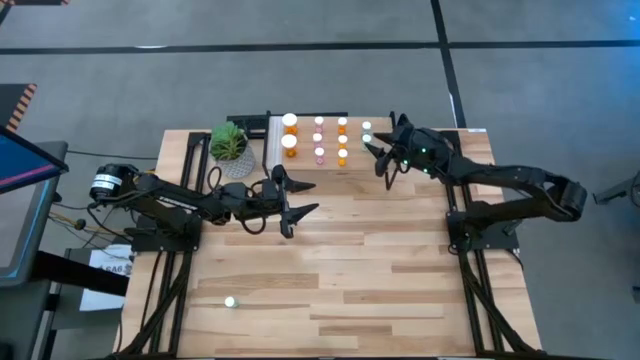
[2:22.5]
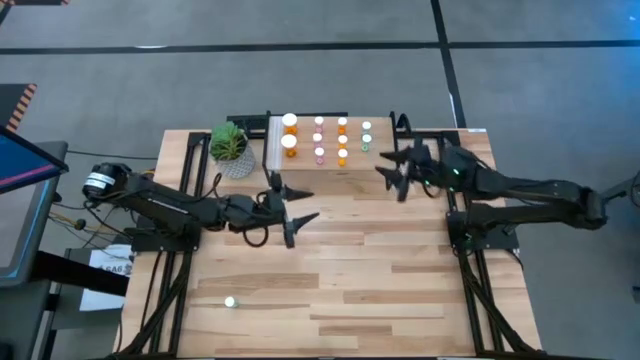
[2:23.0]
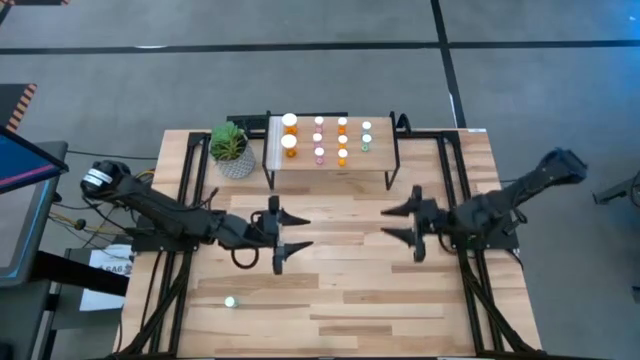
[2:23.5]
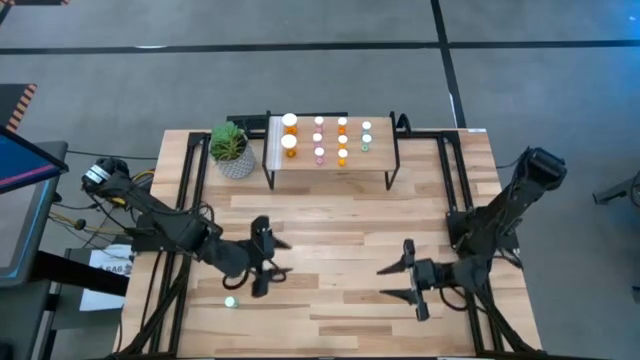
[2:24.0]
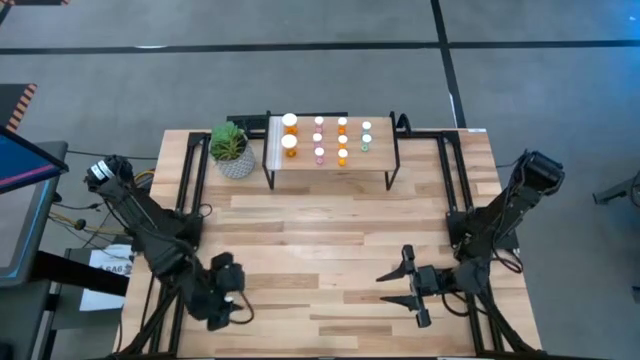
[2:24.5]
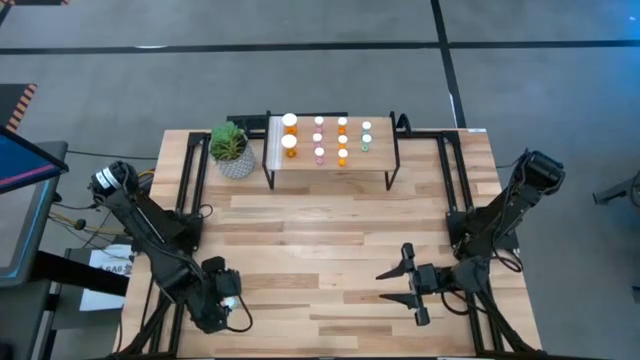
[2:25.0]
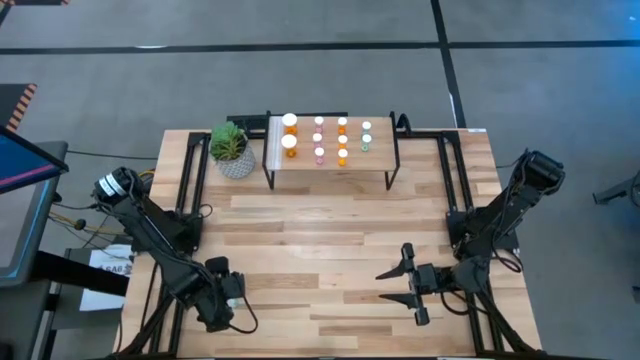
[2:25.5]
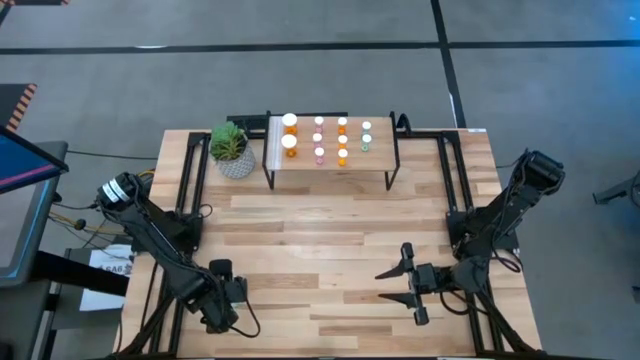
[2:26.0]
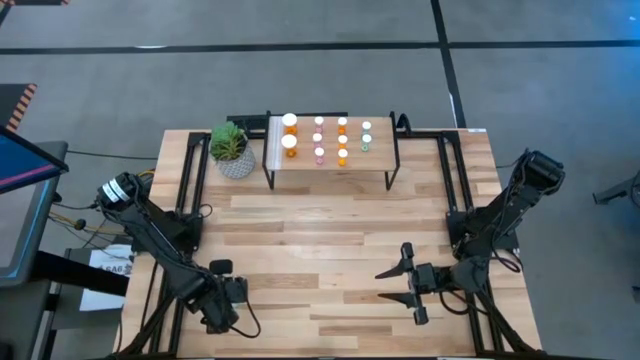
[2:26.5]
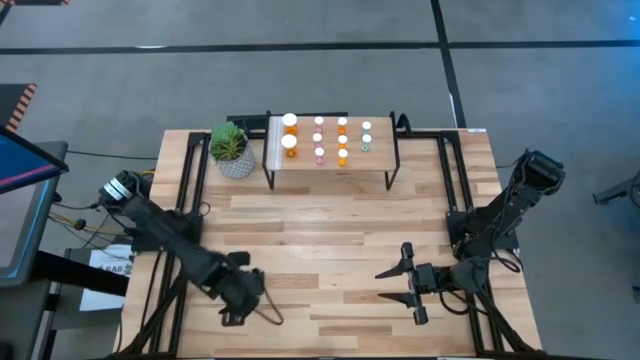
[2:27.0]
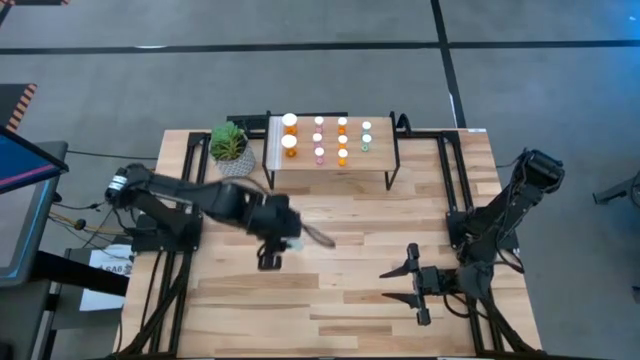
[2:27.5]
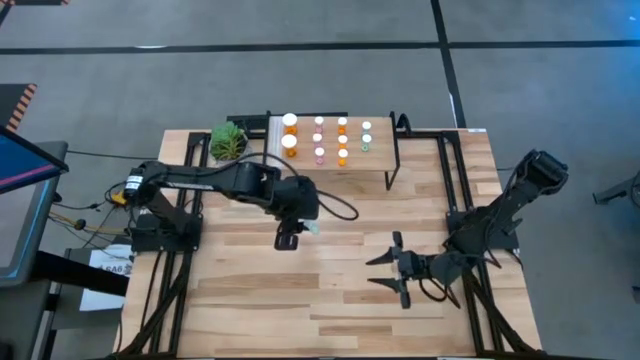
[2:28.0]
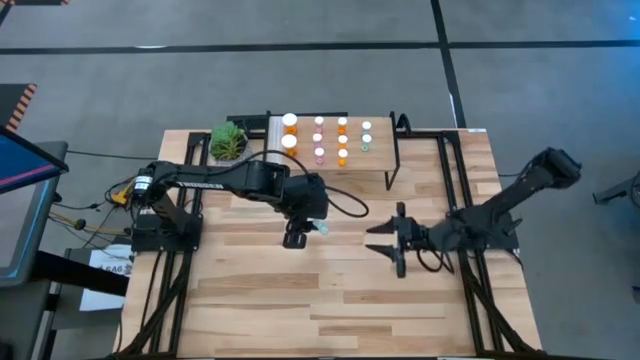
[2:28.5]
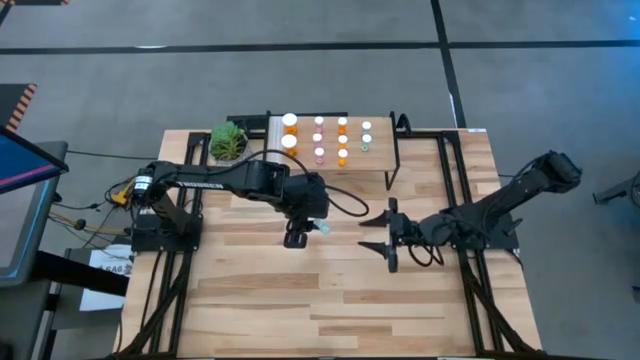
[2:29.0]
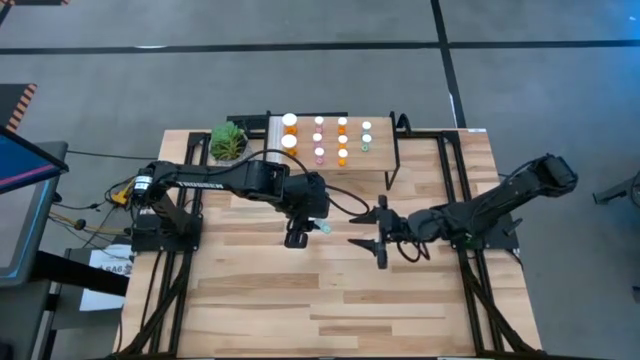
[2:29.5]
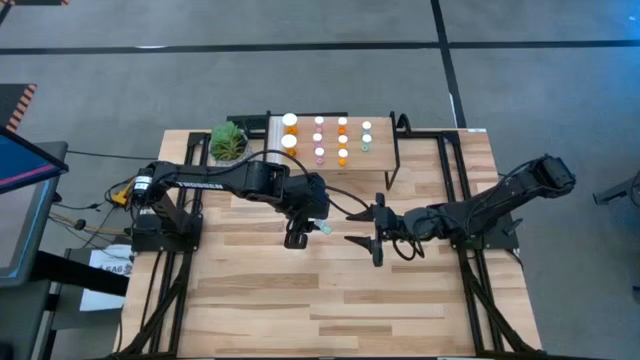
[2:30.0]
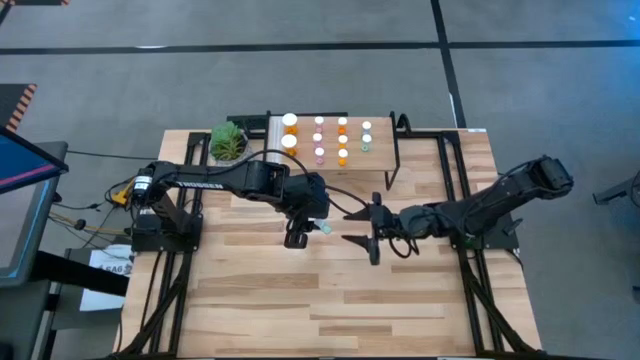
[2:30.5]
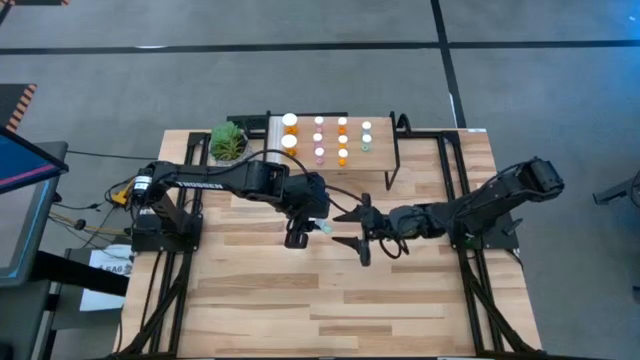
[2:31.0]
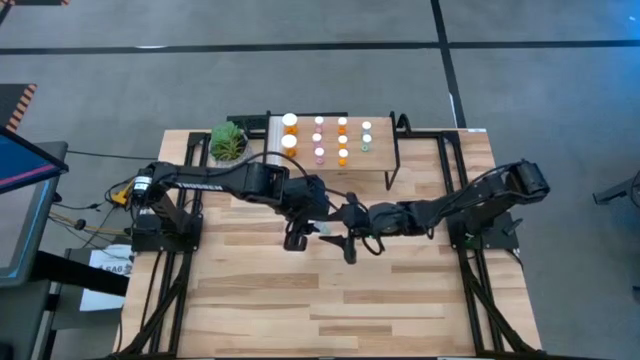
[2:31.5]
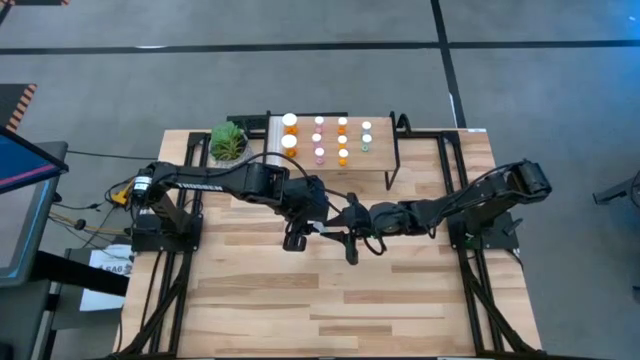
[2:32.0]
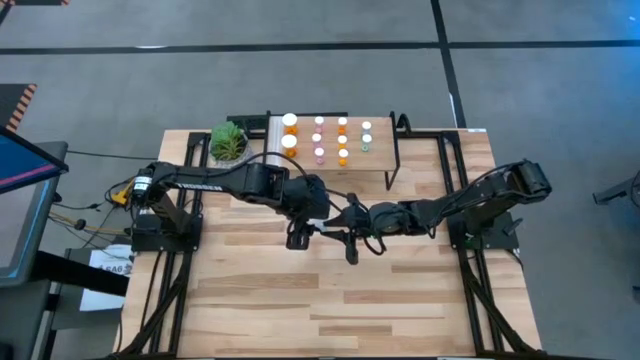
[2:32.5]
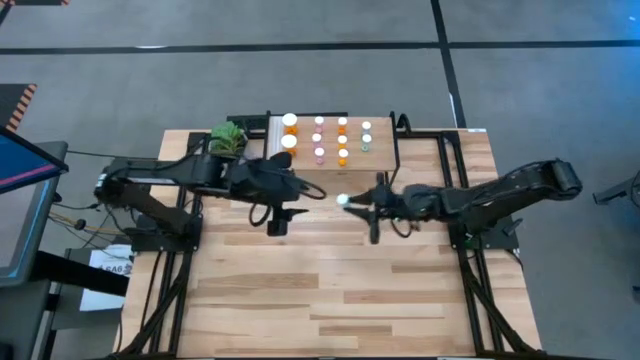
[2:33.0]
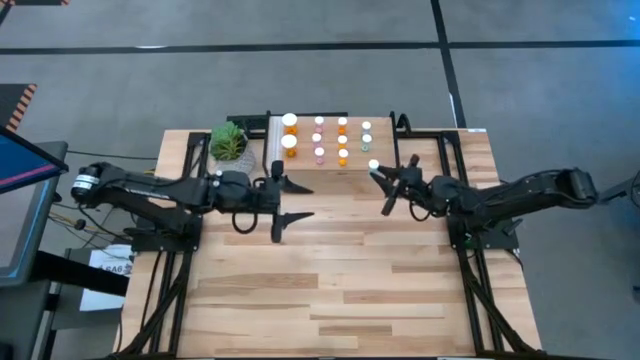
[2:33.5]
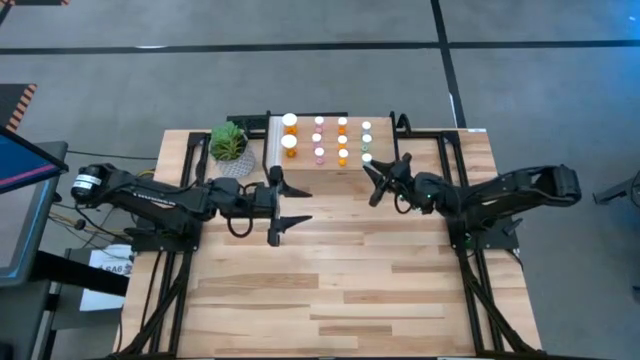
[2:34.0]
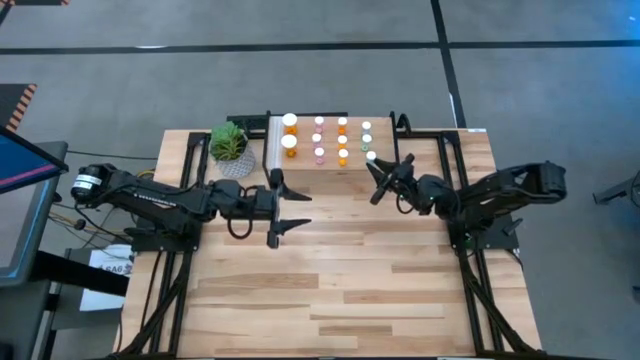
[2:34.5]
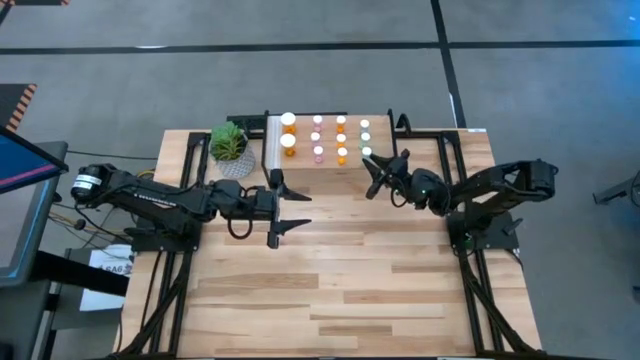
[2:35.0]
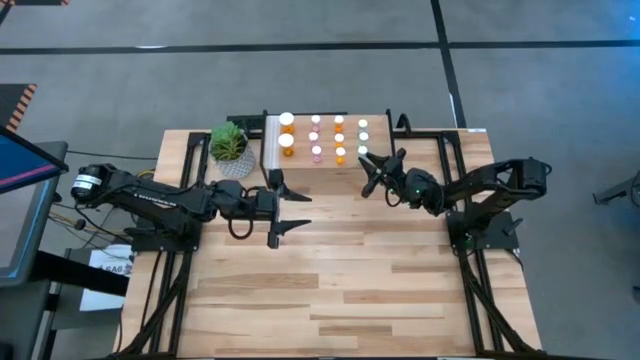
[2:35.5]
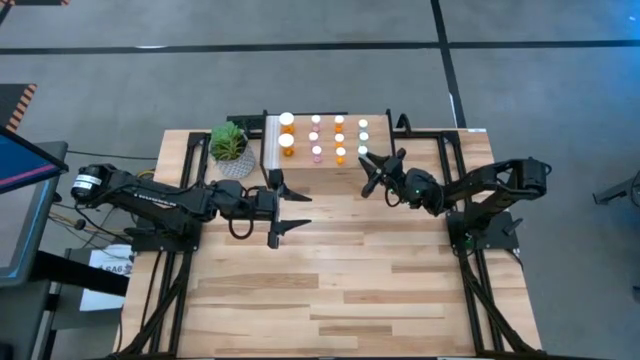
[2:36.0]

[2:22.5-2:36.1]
Task: Pick and place medicine bottles onto shelf by color
Put the blue pill bottle aligned with the other blue pill bottle on the shelf

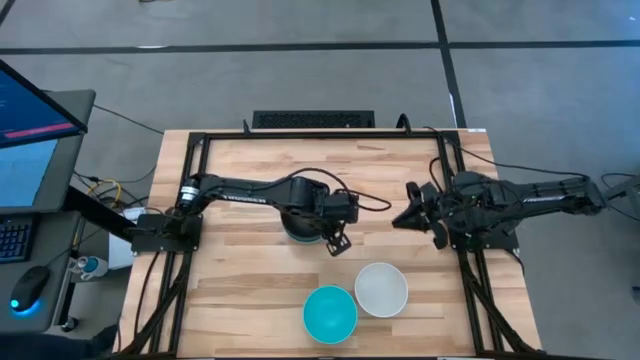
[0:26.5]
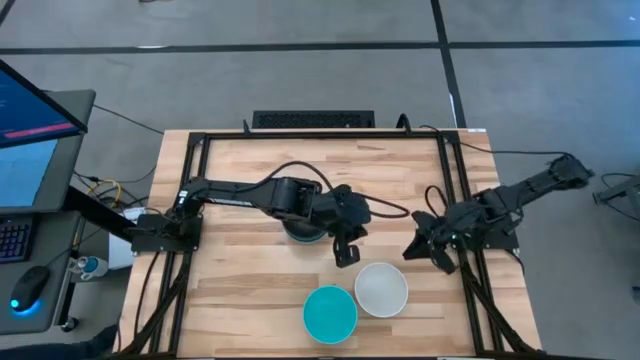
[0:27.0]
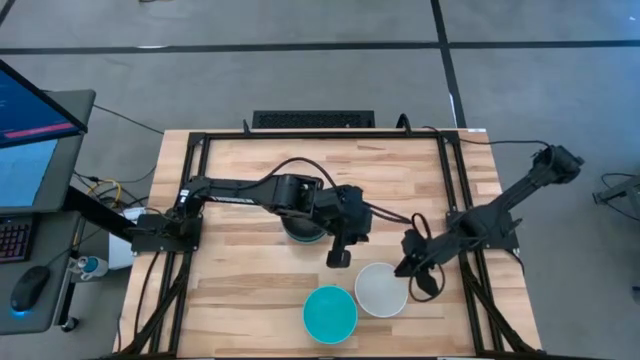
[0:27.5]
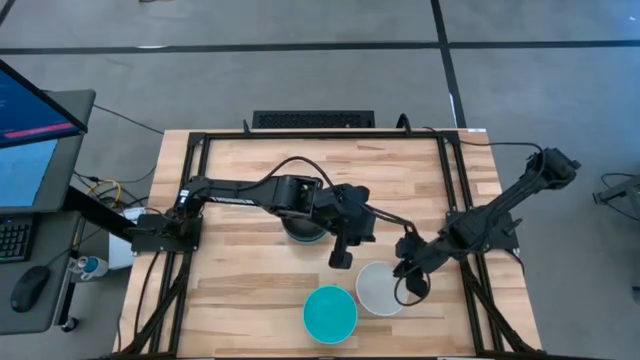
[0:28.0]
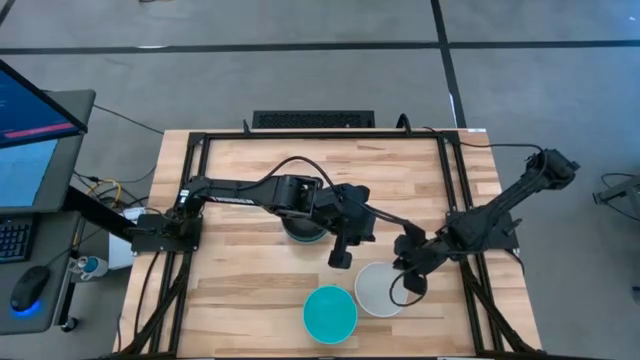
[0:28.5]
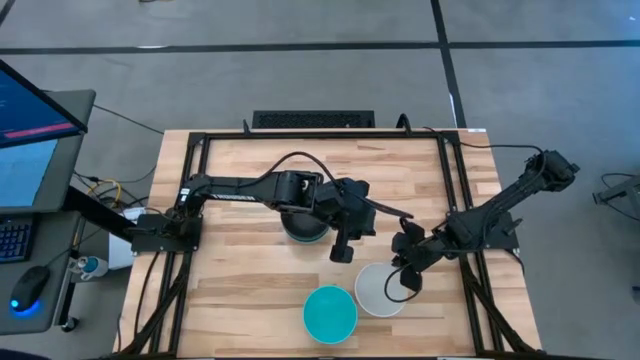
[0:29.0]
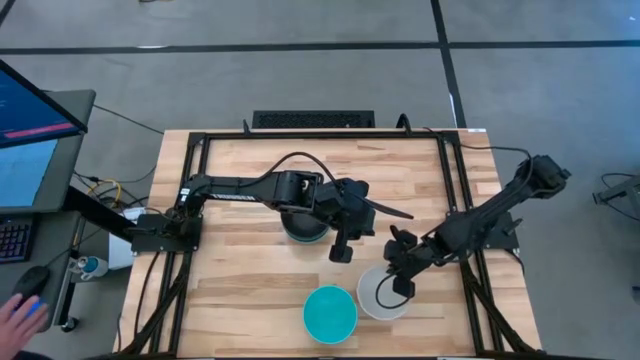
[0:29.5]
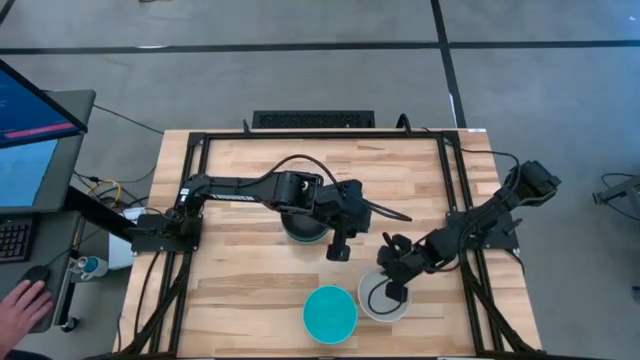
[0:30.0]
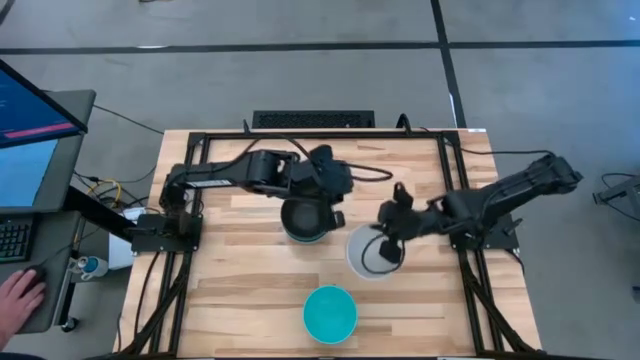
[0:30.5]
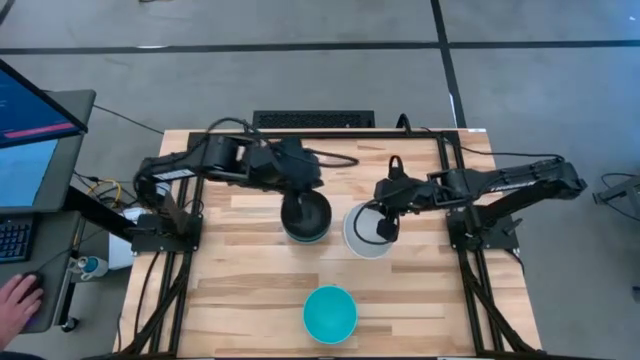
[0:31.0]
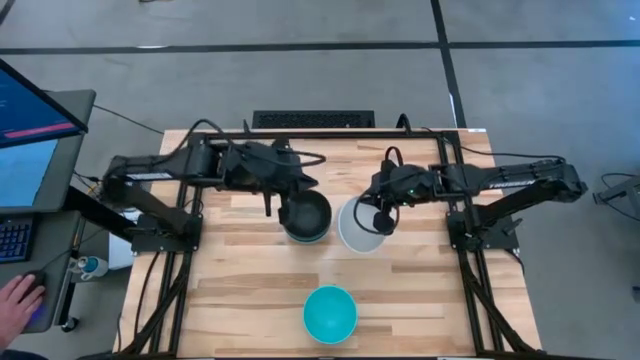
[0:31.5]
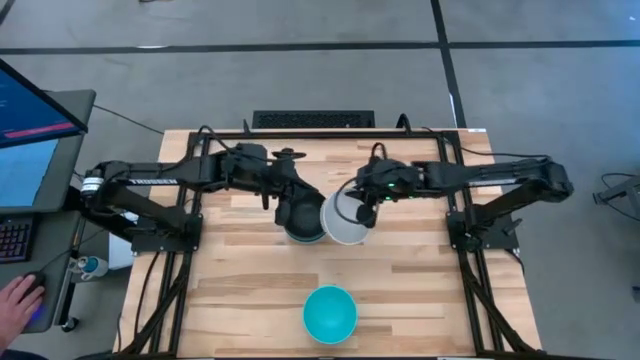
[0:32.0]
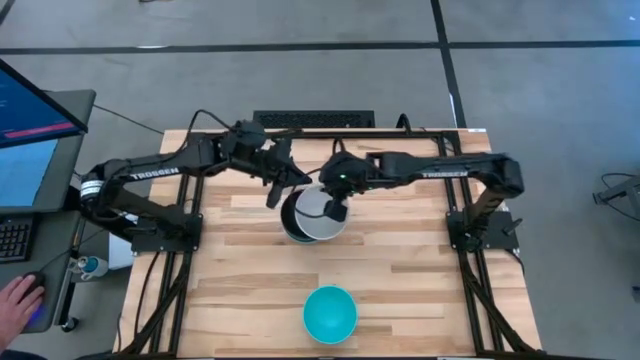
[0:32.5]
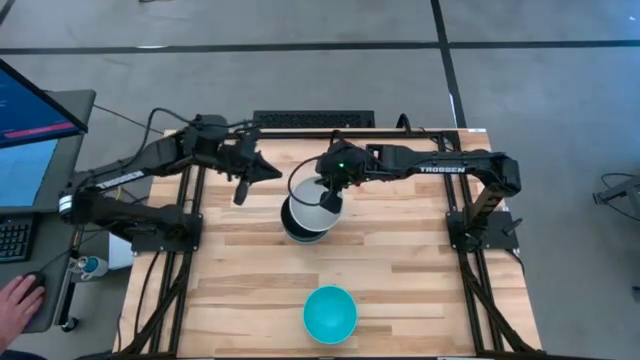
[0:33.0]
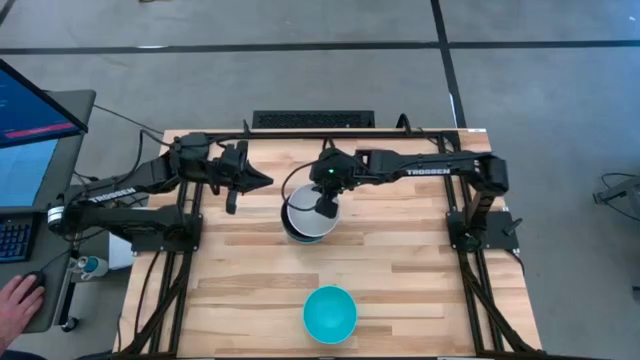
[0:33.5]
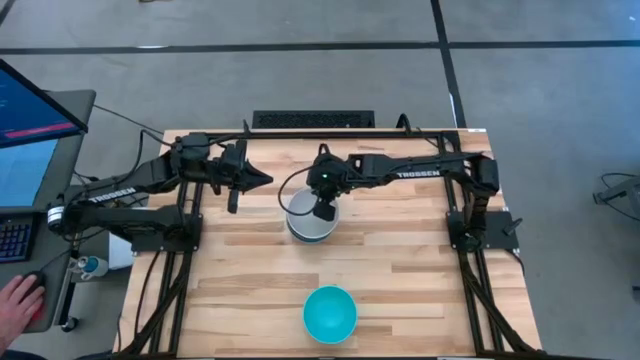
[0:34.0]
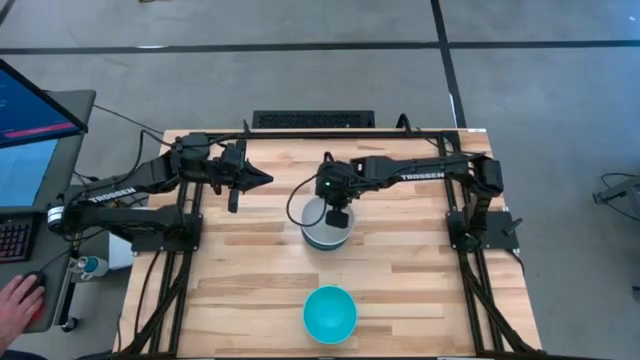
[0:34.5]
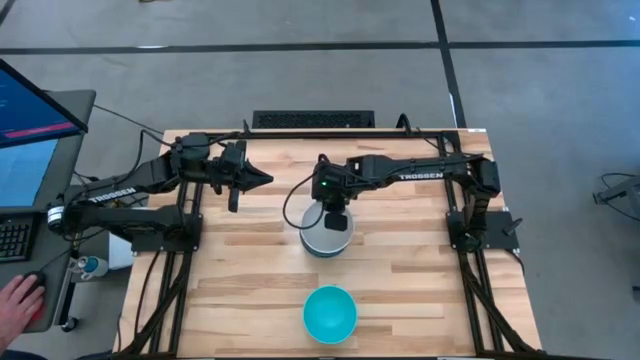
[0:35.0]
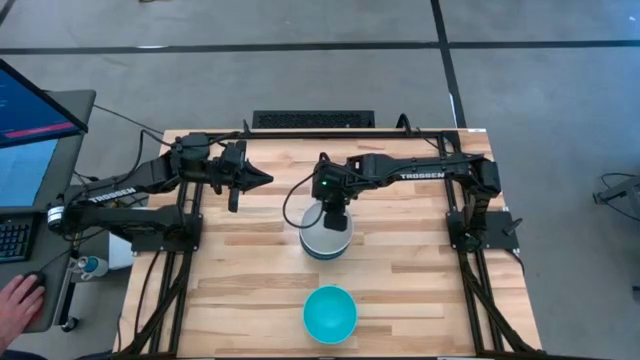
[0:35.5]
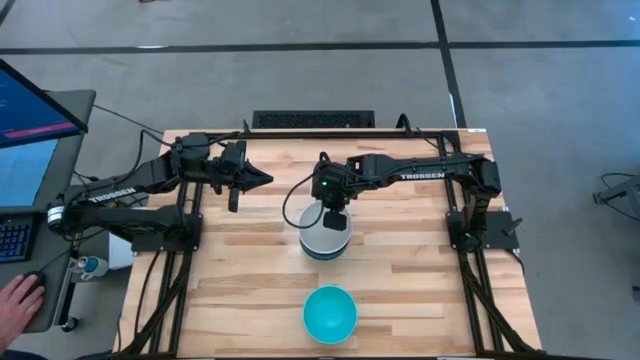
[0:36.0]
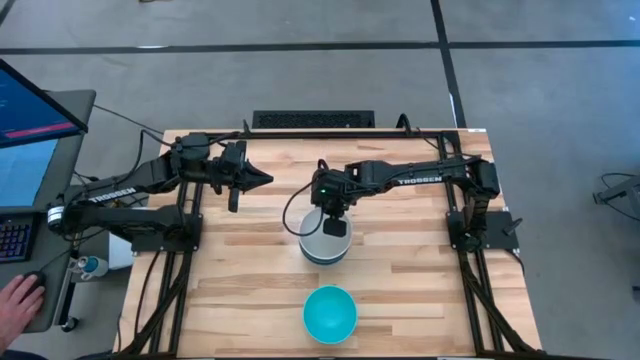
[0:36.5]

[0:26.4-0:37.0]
Task: Nest bowls inside each other
Stack the white bowl on the black bowl
